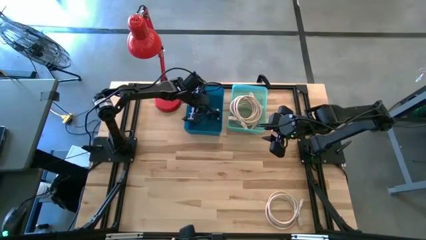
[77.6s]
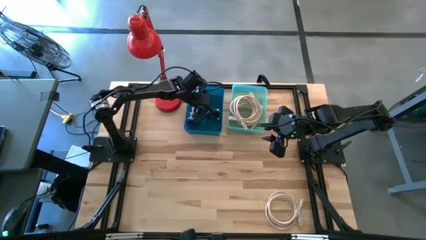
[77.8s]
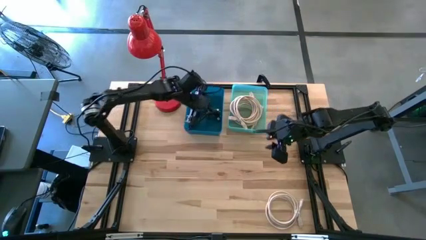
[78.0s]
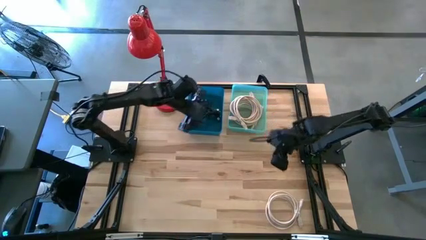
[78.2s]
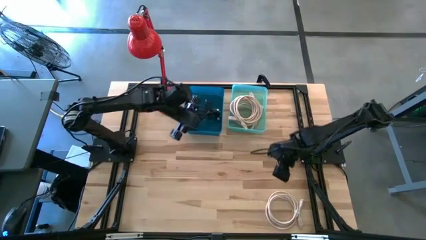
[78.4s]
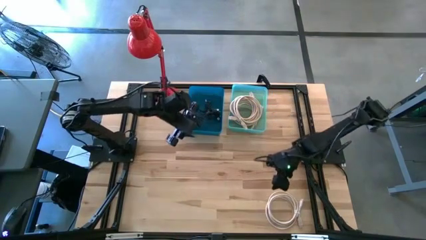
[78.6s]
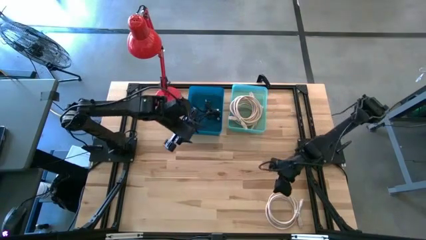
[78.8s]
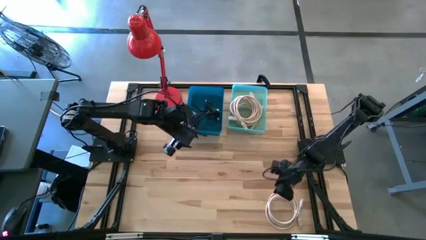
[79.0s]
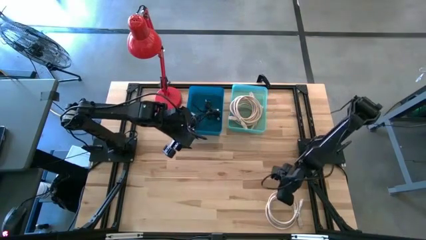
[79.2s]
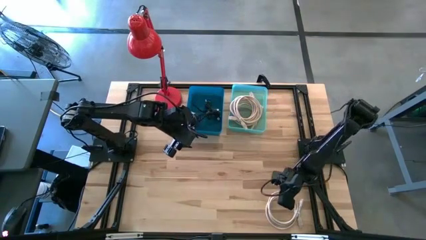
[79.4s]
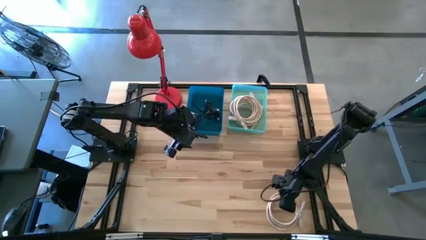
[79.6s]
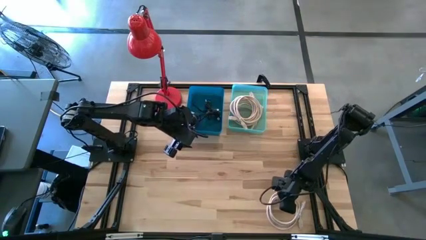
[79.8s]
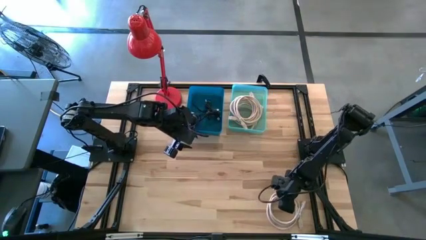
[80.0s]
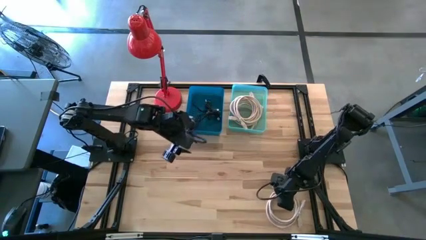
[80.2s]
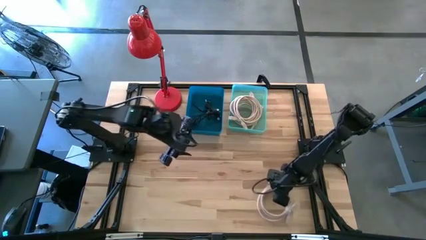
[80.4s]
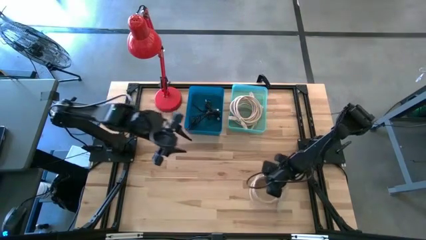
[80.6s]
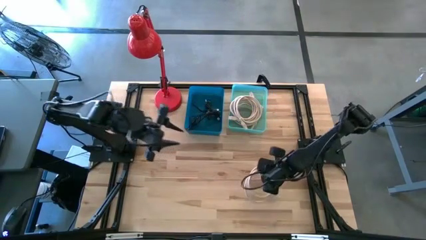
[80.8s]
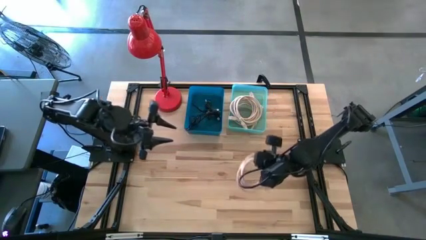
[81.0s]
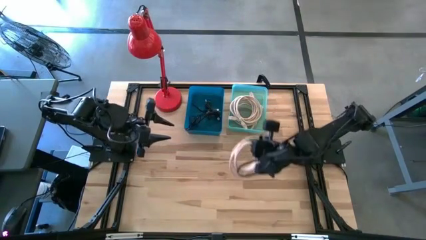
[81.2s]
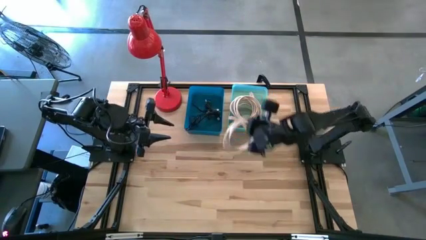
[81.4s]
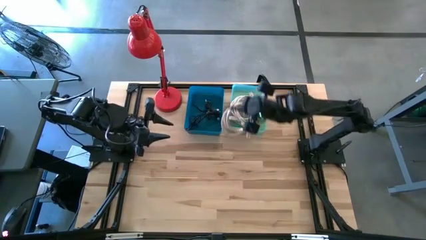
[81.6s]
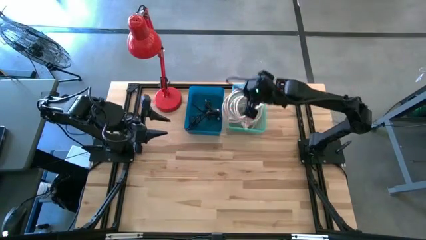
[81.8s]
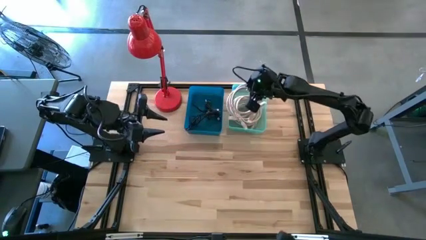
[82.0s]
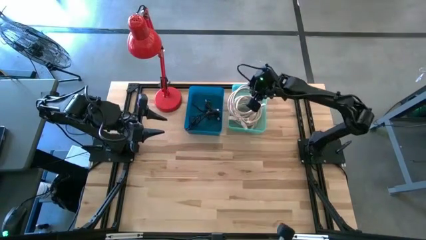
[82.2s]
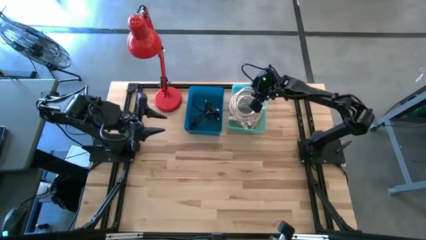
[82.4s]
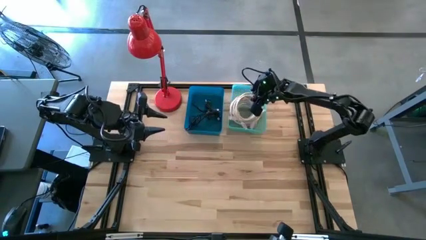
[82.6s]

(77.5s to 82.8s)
Task: Pick & Place USB Port
Put the light brown hdmi cable into the light green bin

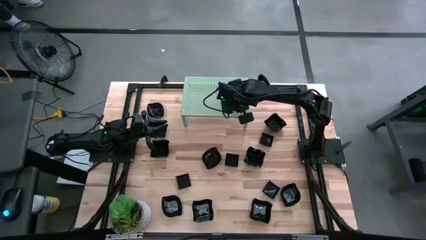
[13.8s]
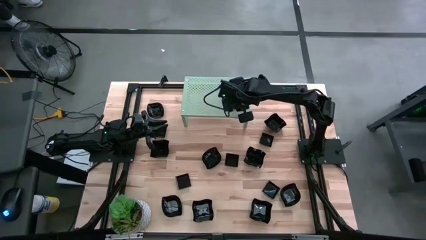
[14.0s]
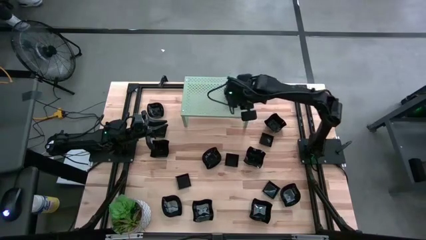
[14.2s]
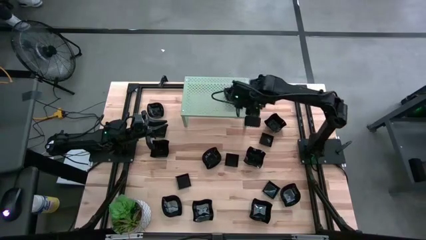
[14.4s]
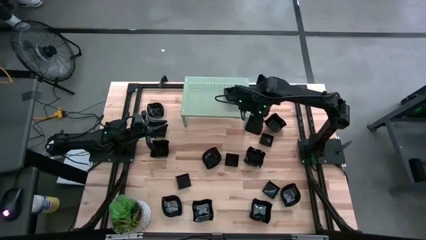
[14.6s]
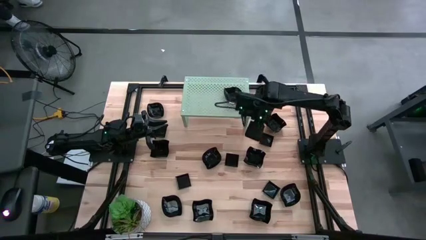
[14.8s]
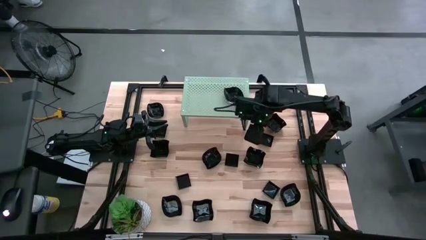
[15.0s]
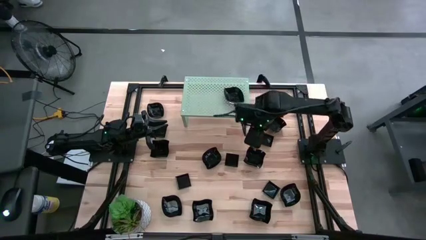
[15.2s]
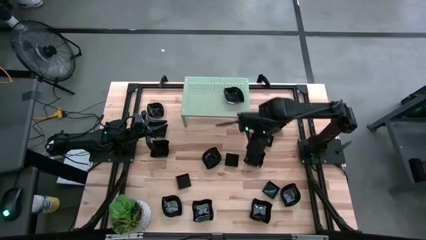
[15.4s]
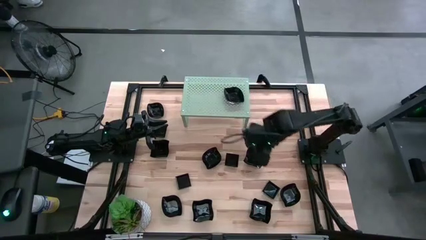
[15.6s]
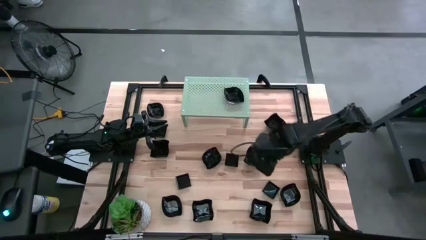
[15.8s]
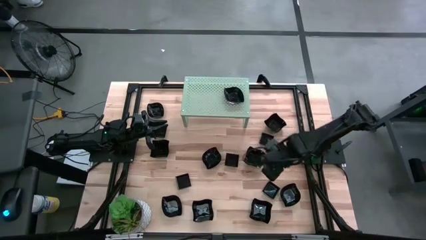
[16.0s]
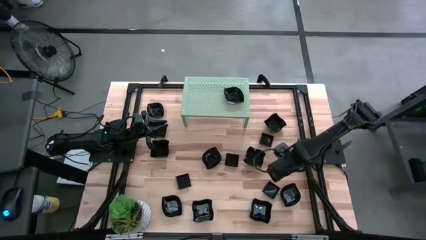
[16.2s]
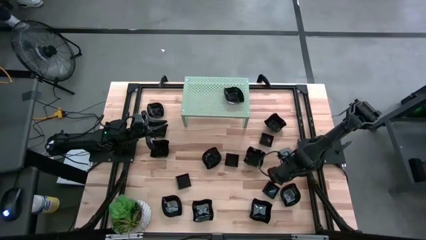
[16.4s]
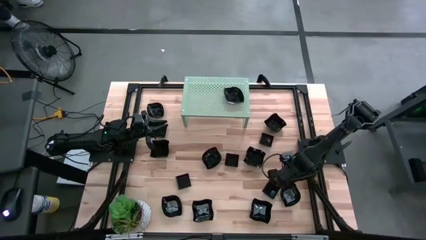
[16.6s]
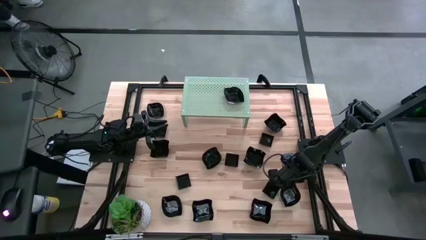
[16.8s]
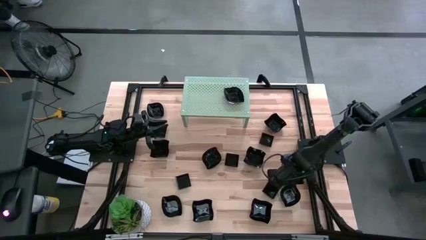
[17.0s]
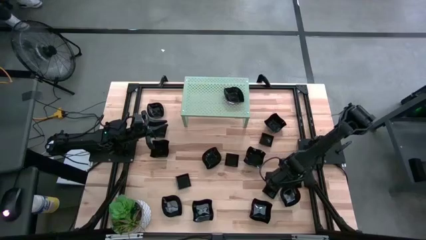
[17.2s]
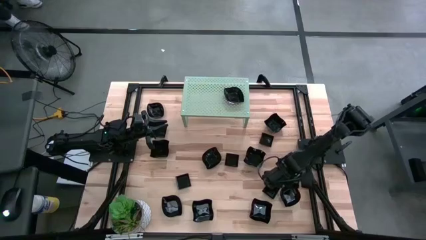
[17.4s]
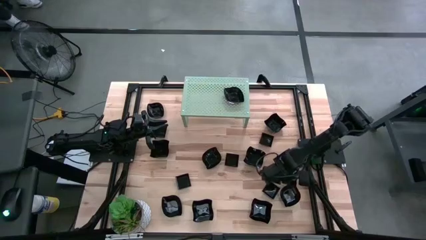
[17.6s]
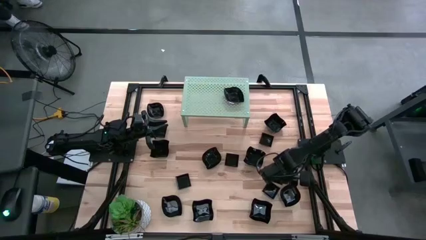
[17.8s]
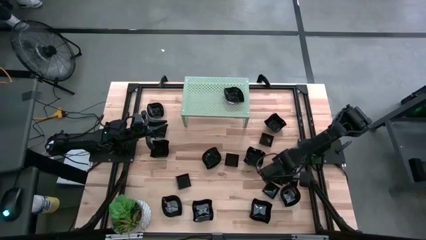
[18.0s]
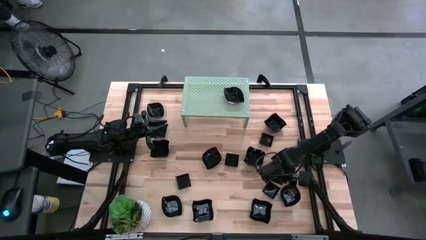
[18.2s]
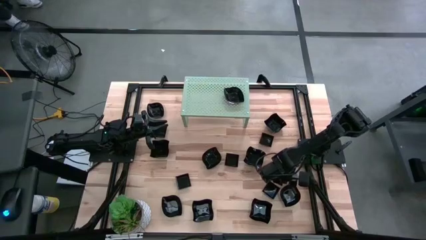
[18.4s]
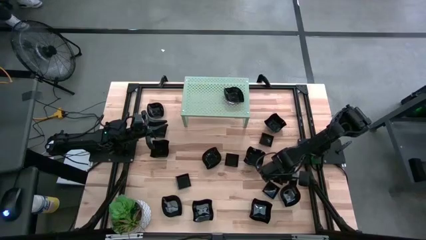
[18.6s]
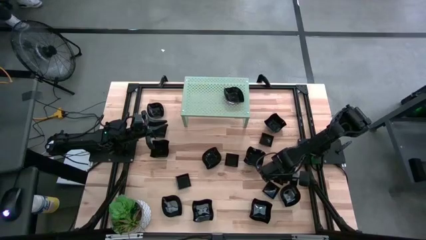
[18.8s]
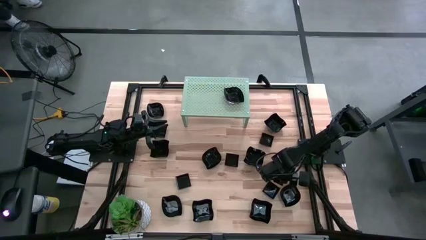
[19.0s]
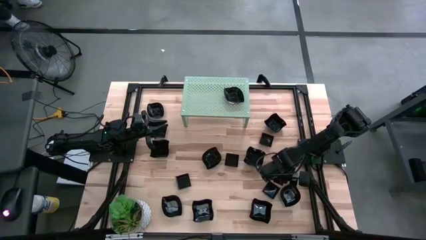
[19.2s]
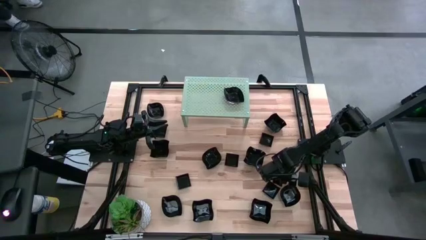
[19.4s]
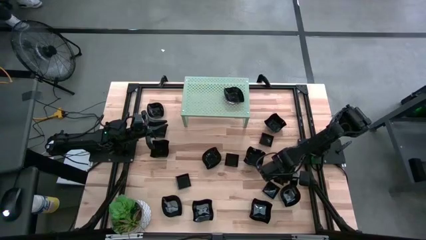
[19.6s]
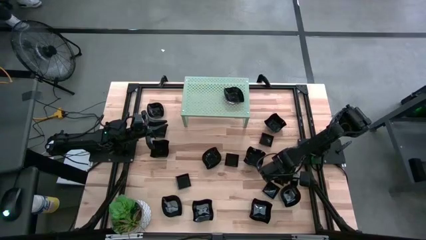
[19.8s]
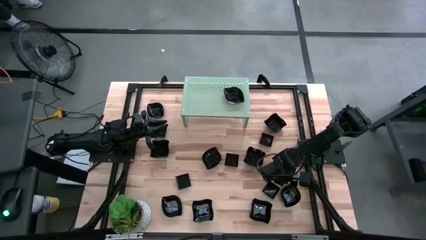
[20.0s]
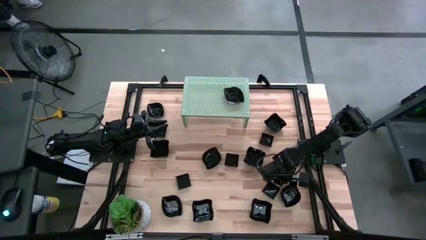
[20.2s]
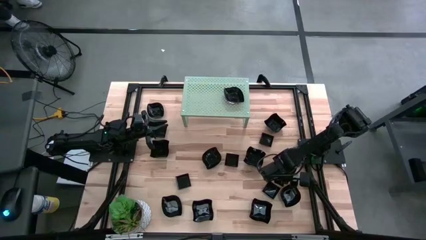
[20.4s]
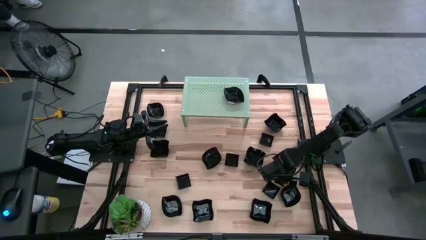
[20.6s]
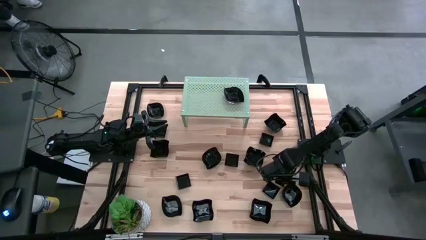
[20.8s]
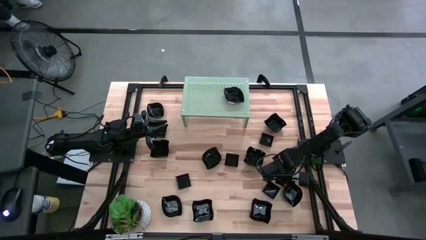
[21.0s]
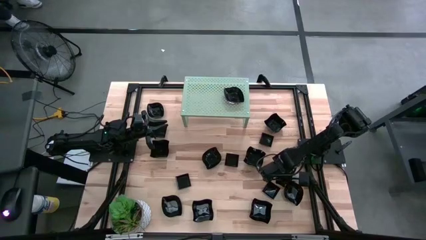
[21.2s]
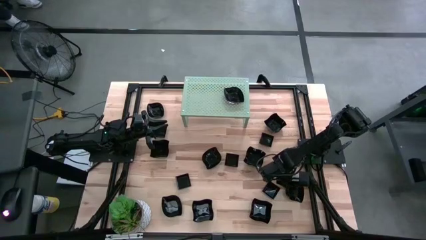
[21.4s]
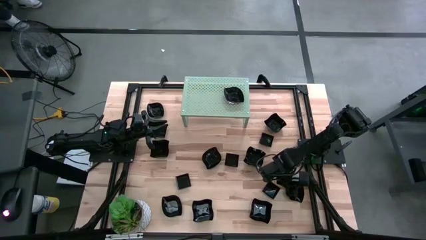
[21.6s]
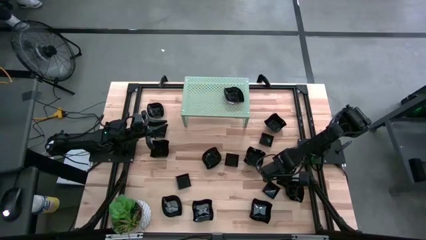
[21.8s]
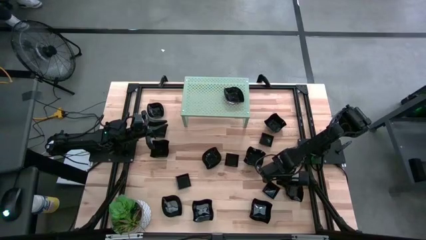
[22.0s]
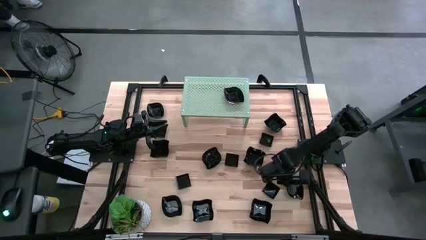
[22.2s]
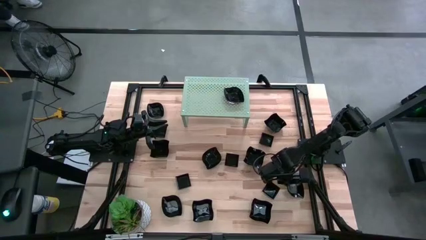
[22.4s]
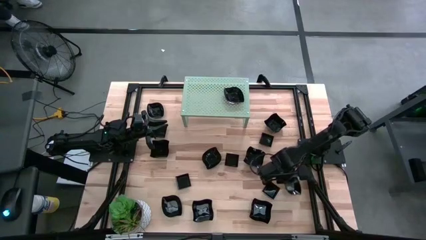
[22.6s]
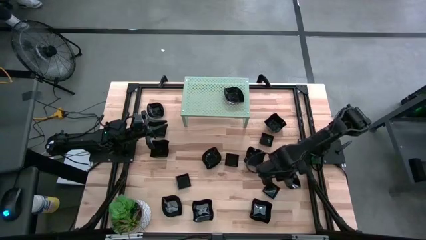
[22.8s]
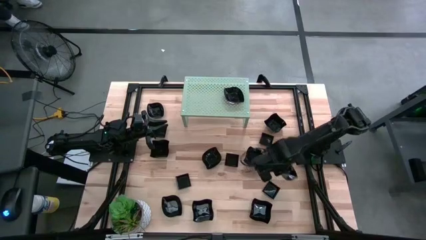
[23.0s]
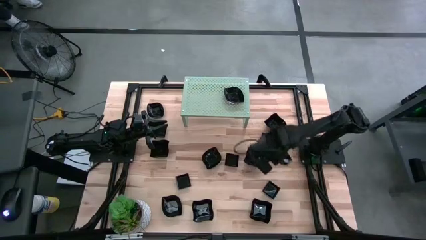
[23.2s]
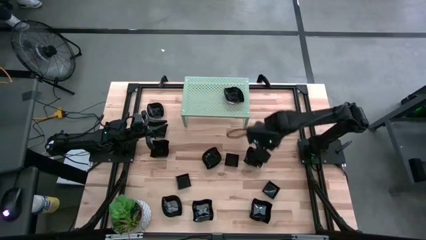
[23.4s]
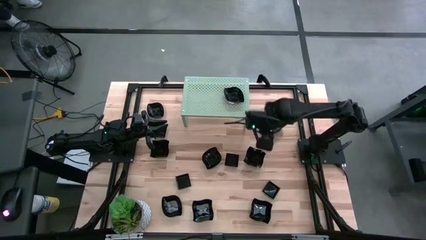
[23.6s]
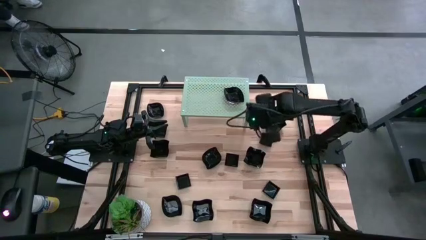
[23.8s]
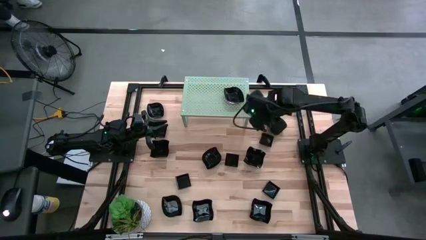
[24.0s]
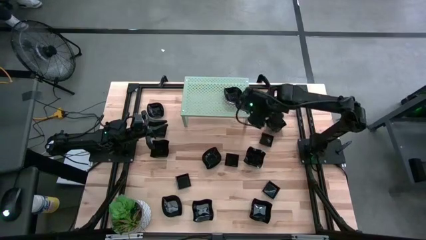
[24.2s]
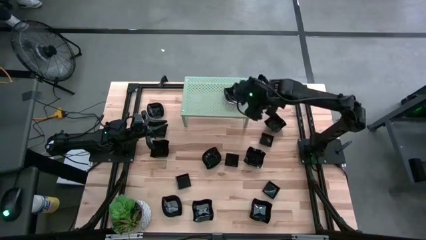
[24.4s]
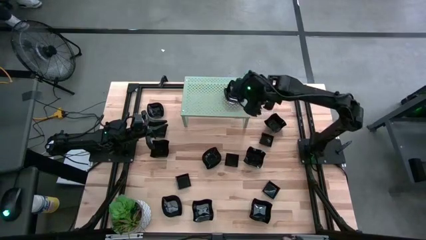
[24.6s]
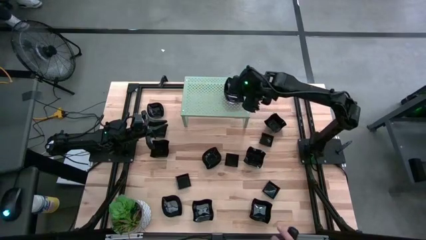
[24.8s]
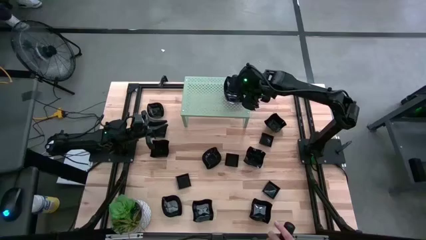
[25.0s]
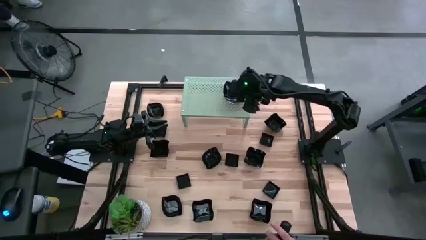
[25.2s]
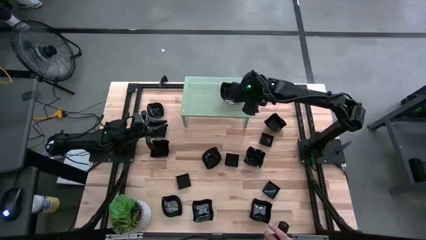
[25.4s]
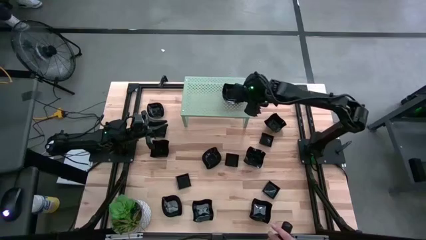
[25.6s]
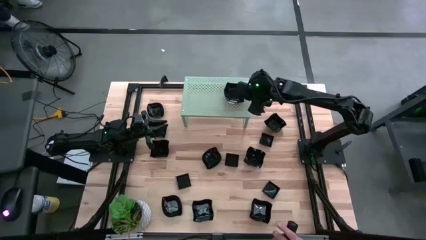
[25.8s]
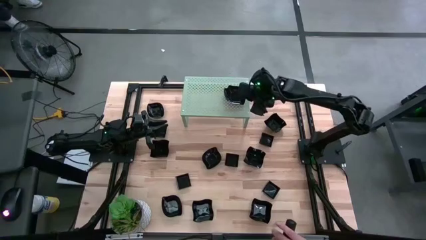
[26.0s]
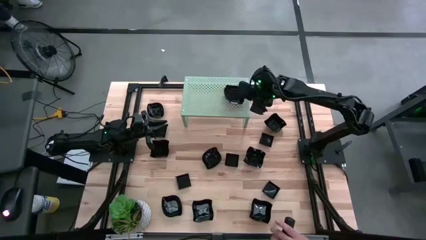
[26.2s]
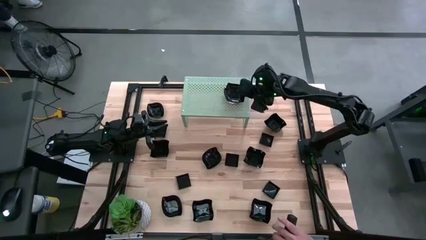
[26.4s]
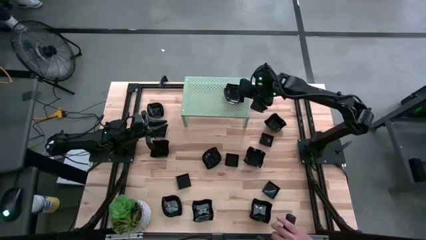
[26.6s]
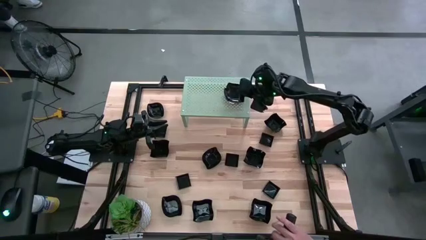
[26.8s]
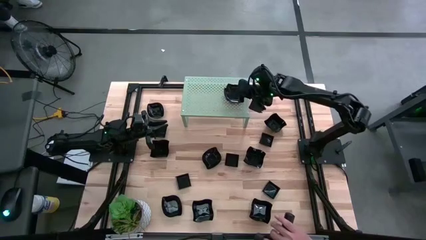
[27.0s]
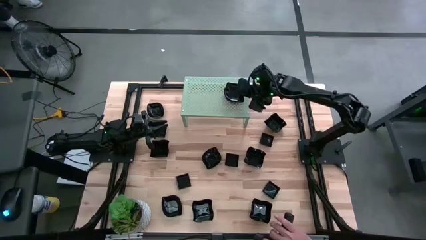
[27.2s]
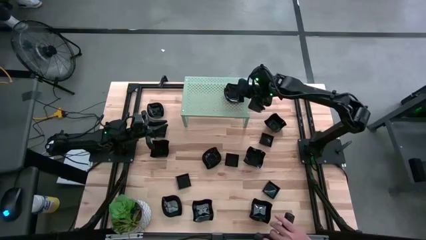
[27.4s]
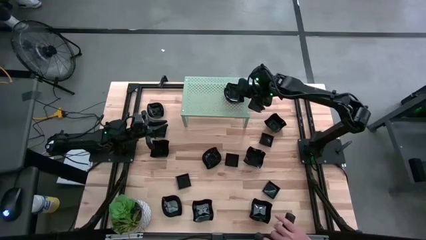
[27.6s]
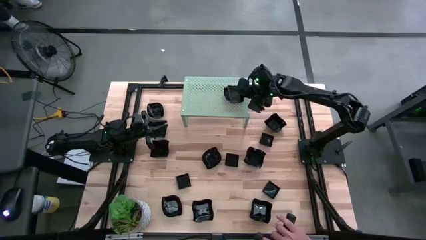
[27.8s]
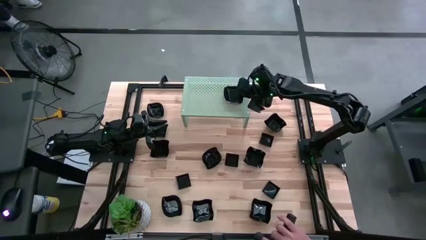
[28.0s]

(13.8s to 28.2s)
Task: Pick & Place Mini shaped plates
Stack the leaf shaped plate on top of the leaf shaped plate on the shelf
